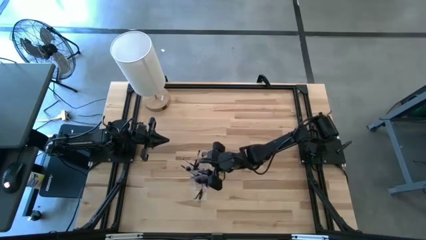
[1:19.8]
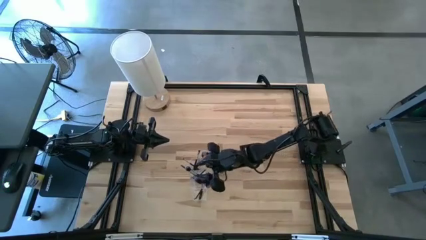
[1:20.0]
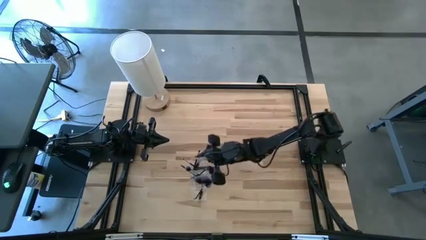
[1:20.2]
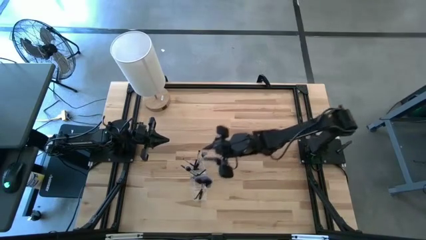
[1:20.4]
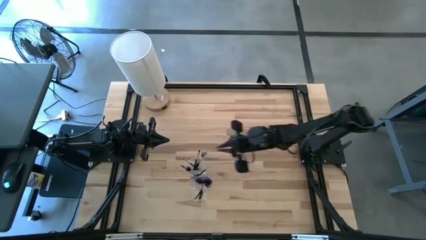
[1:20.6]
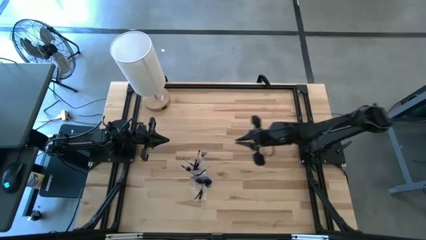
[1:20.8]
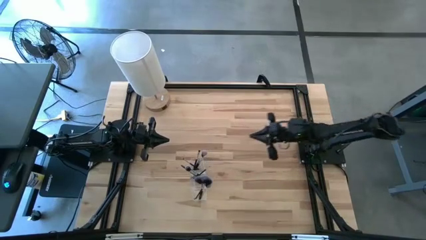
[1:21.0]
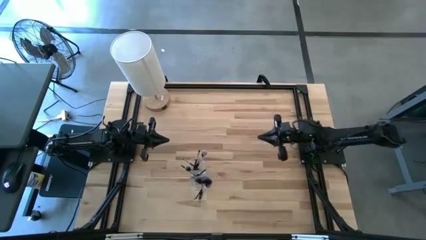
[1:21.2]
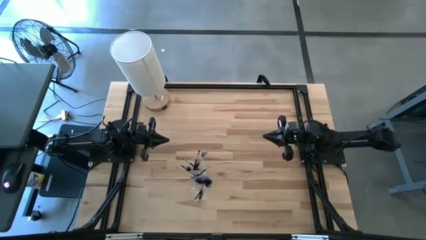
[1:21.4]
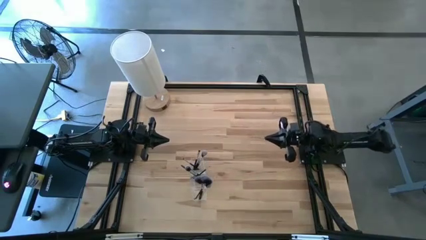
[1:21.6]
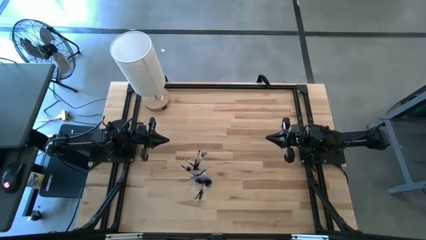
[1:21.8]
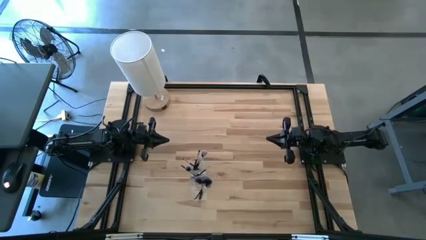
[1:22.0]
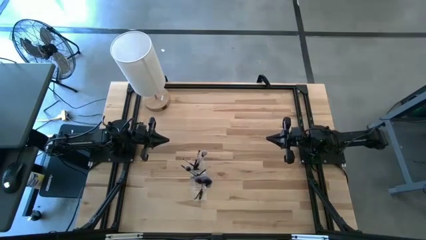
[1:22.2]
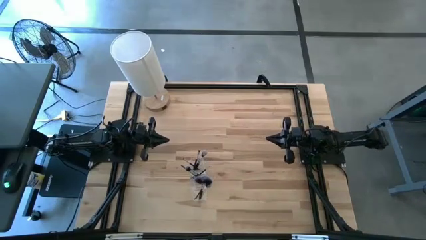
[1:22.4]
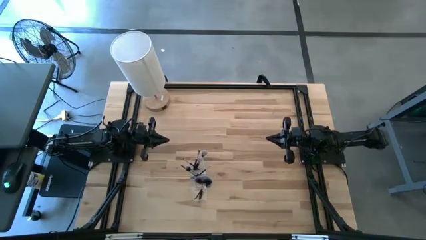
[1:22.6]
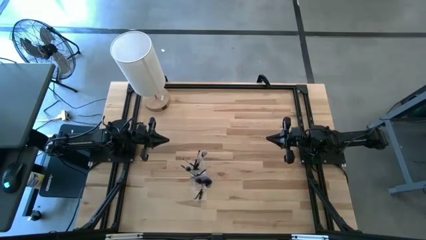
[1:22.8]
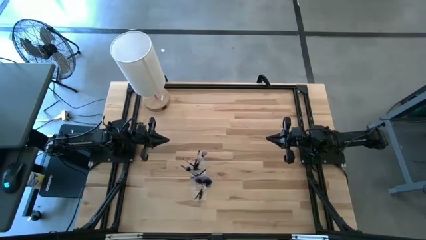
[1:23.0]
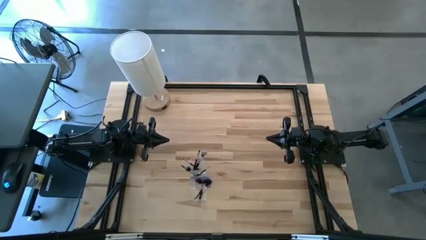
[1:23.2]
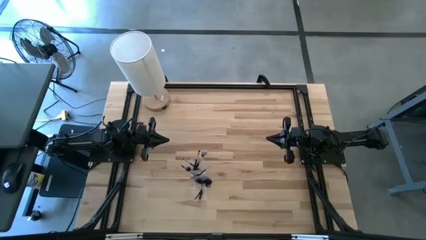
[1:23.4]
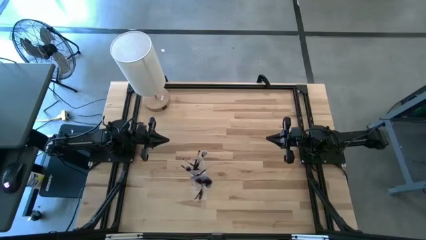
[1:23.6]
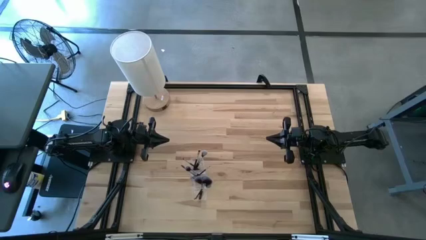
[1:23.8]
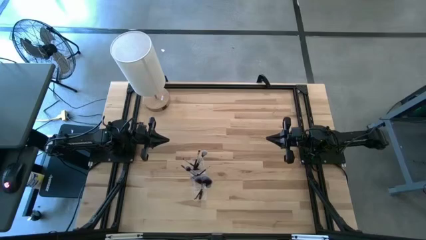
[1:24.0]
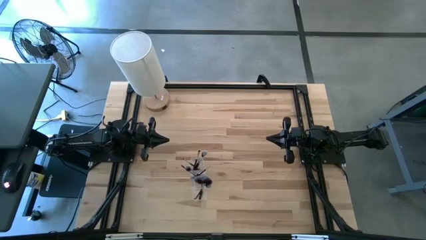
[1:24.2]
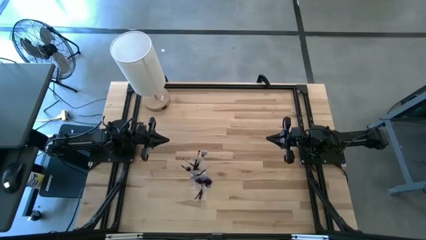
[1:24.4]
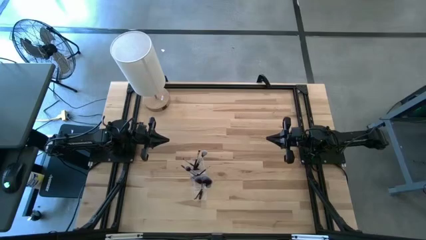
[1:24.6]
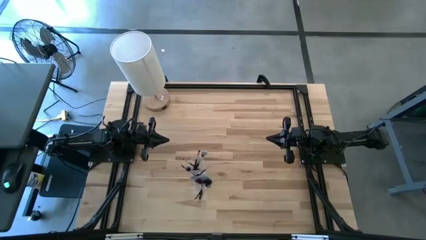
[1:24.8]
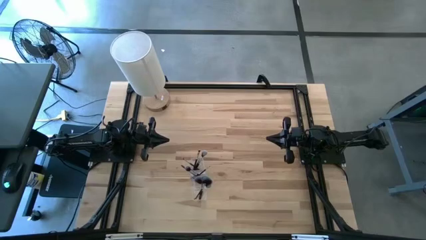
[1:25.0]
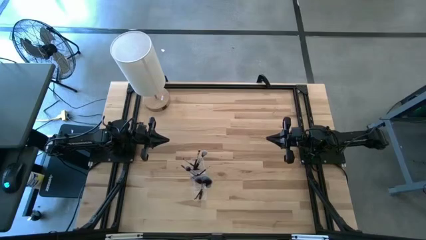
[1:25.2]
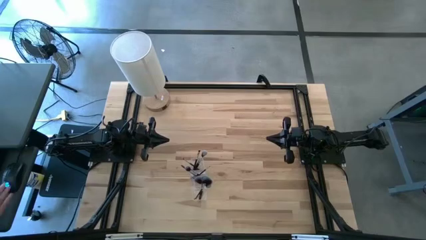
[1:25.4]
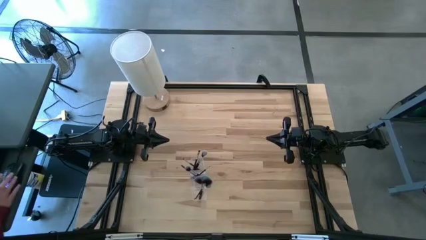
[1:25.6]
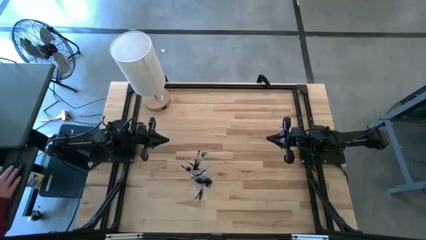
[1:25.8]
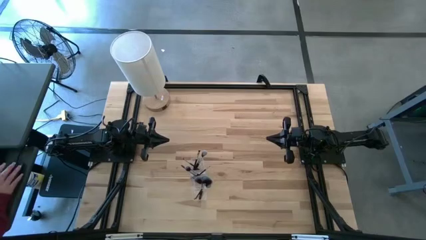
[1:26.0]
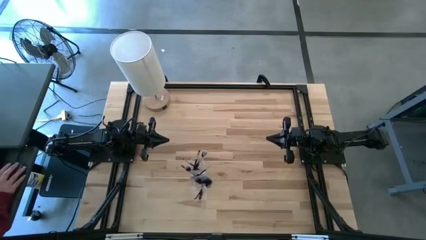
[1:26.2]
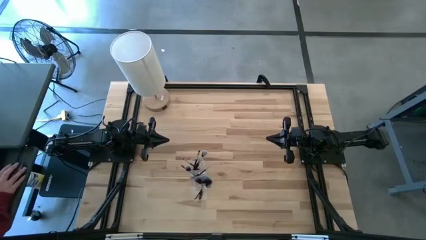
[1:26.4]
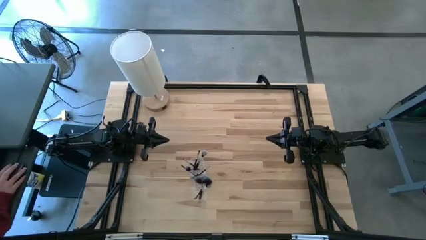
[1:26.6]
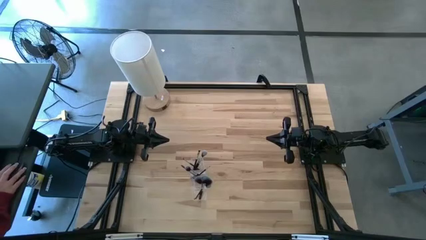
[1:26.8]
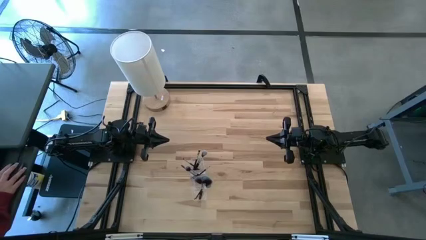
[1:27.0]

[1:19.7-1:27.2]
Task: Put items in baskets/containers
Return to Home Position

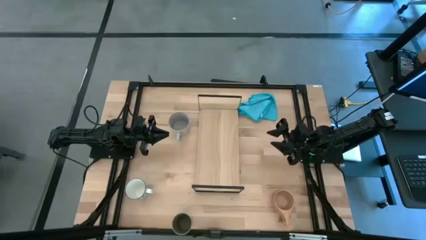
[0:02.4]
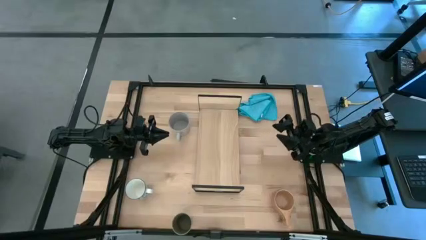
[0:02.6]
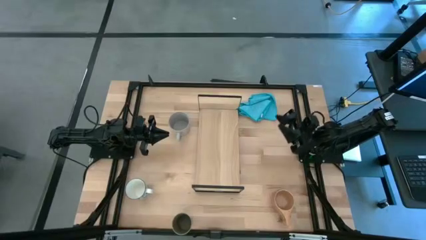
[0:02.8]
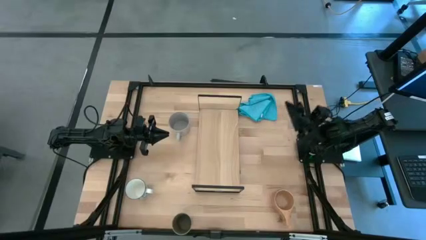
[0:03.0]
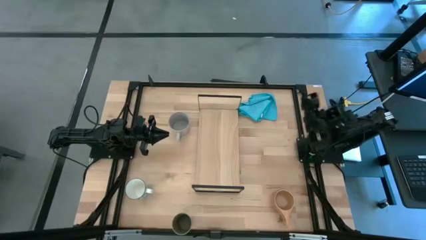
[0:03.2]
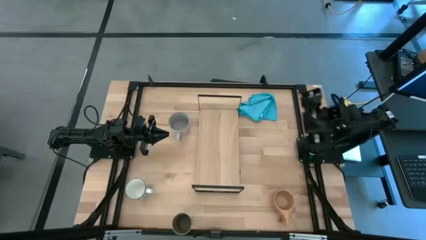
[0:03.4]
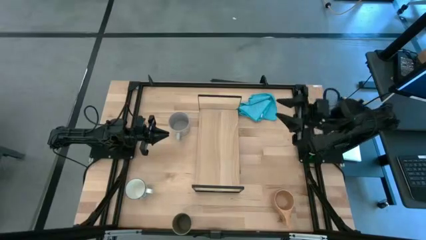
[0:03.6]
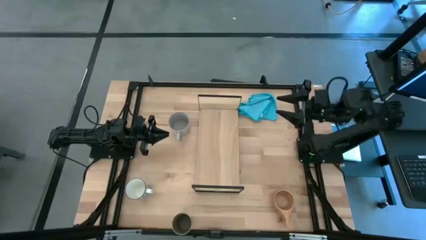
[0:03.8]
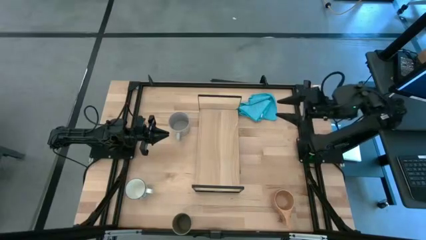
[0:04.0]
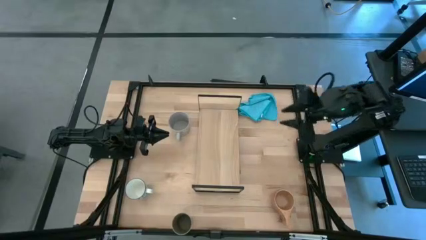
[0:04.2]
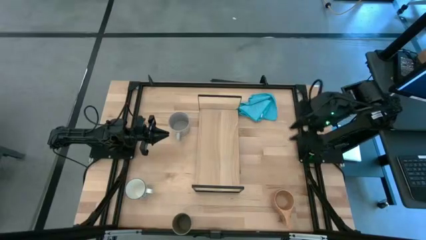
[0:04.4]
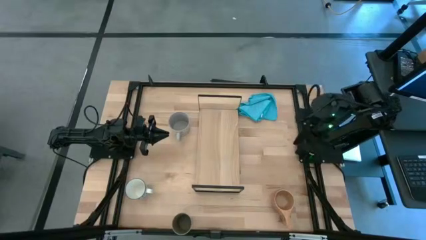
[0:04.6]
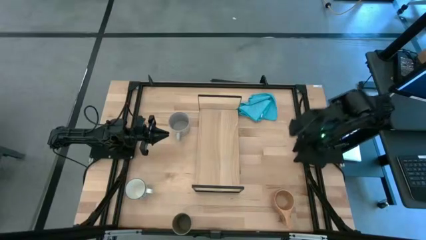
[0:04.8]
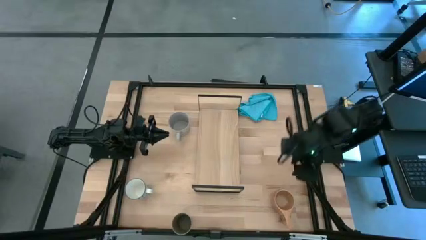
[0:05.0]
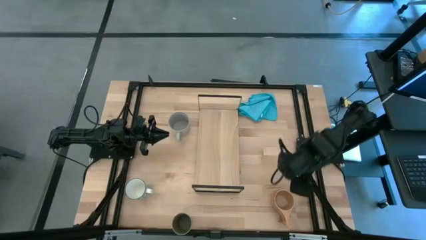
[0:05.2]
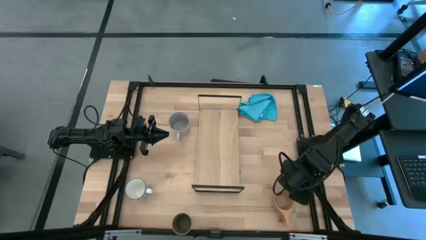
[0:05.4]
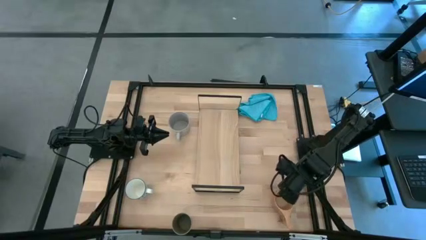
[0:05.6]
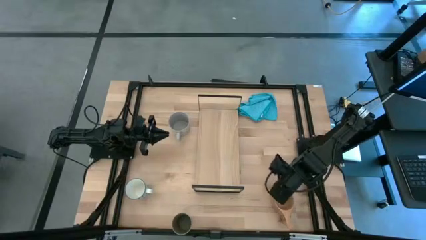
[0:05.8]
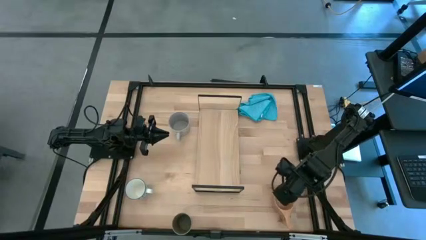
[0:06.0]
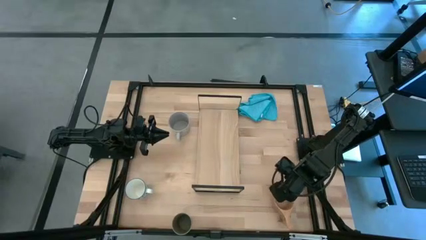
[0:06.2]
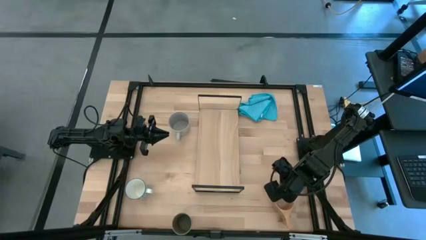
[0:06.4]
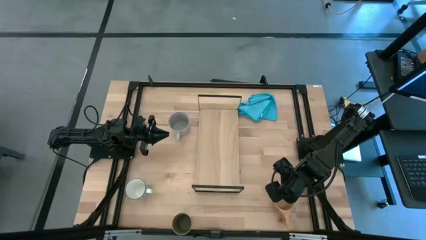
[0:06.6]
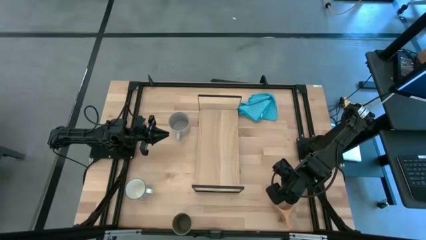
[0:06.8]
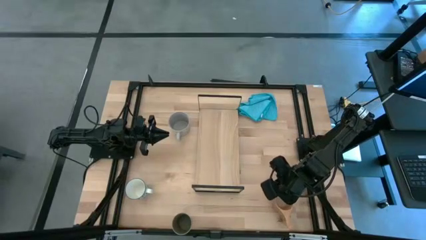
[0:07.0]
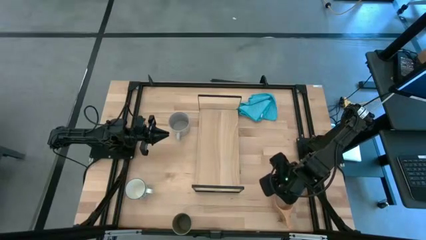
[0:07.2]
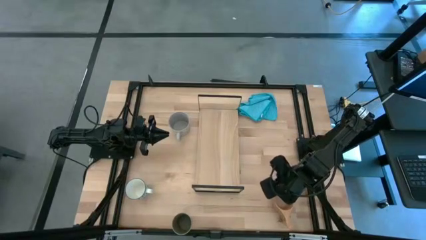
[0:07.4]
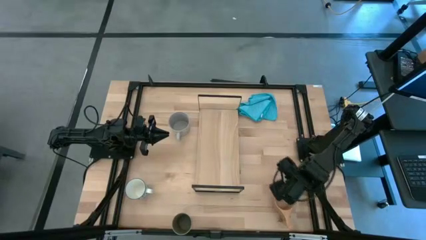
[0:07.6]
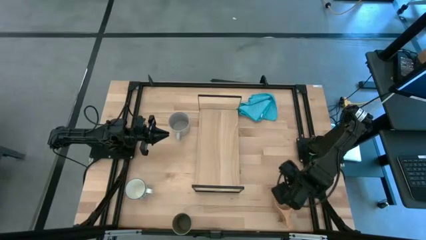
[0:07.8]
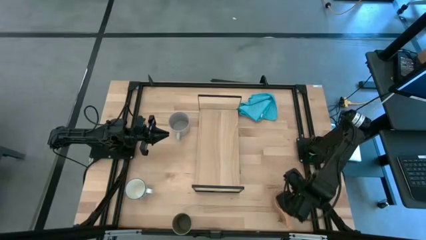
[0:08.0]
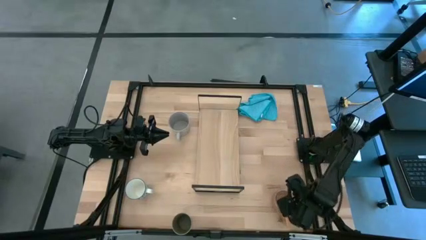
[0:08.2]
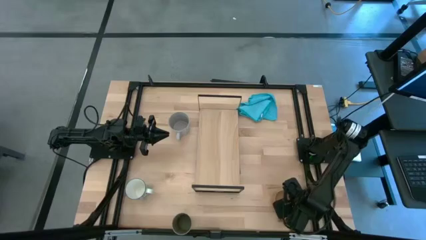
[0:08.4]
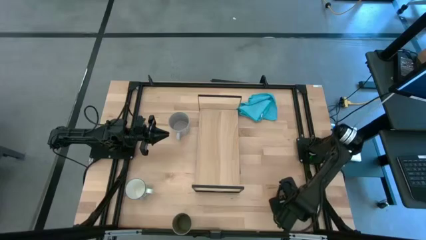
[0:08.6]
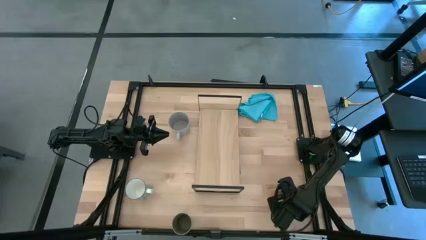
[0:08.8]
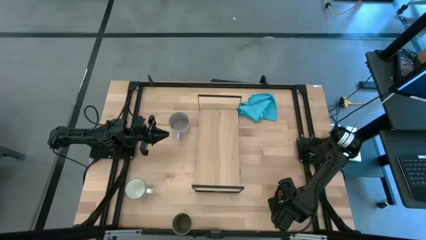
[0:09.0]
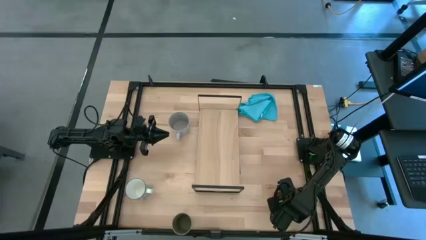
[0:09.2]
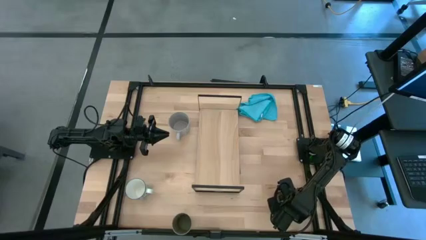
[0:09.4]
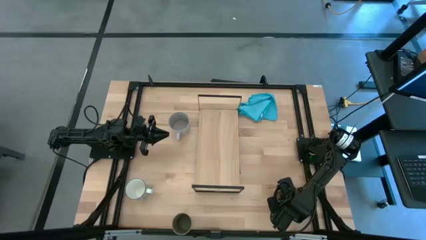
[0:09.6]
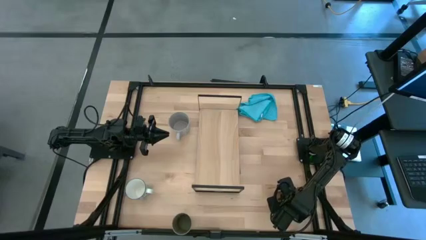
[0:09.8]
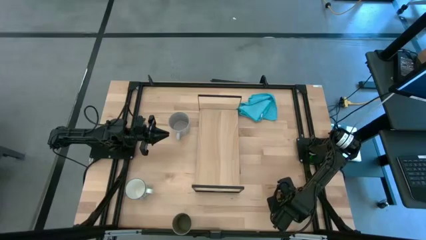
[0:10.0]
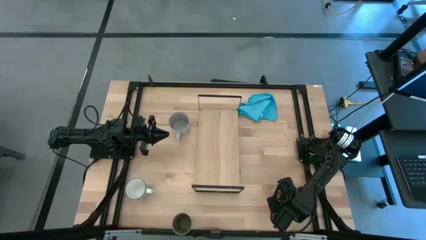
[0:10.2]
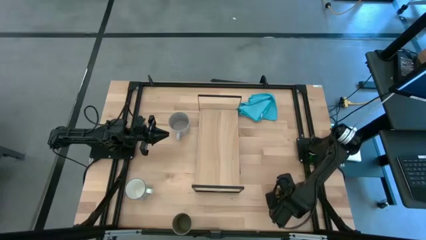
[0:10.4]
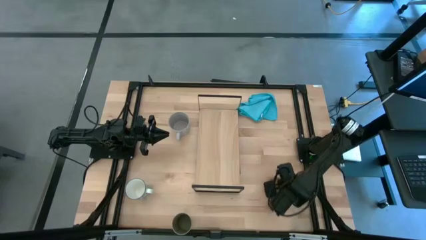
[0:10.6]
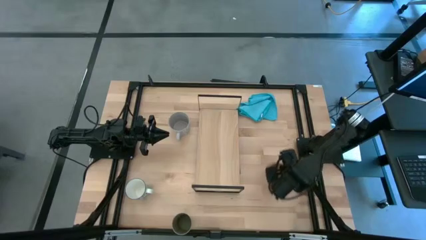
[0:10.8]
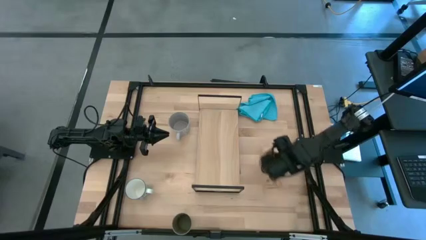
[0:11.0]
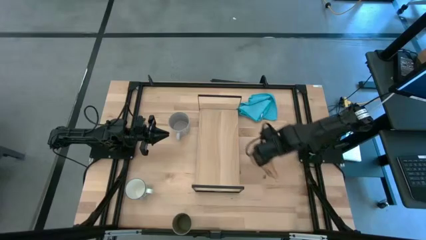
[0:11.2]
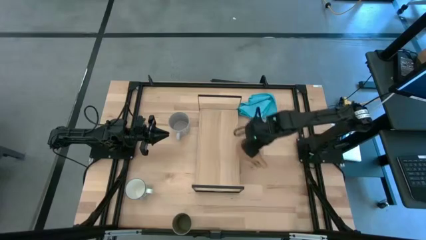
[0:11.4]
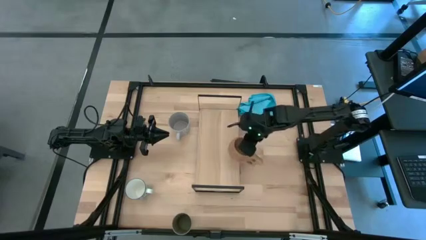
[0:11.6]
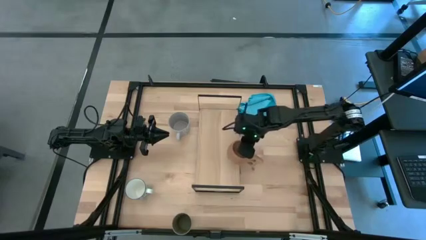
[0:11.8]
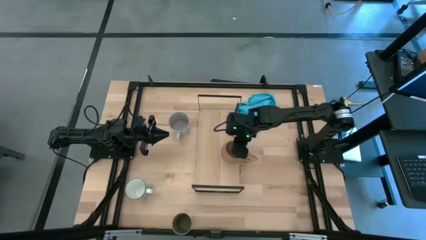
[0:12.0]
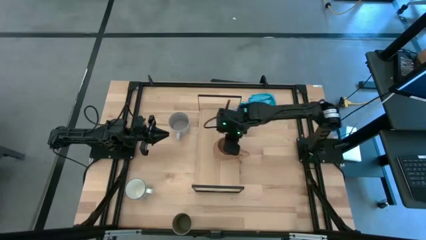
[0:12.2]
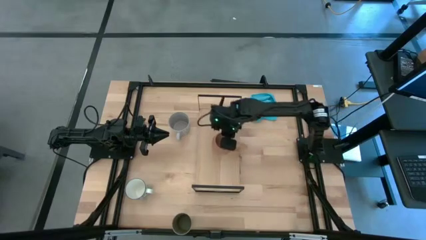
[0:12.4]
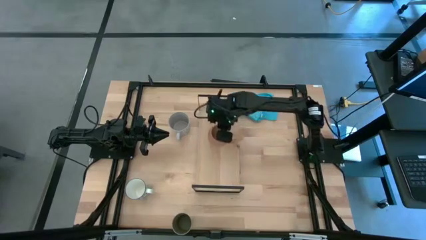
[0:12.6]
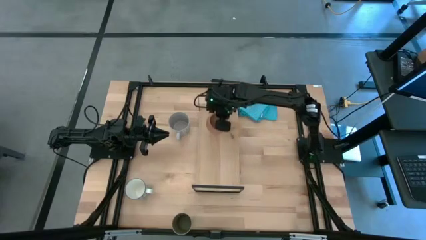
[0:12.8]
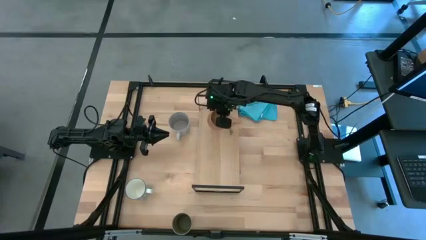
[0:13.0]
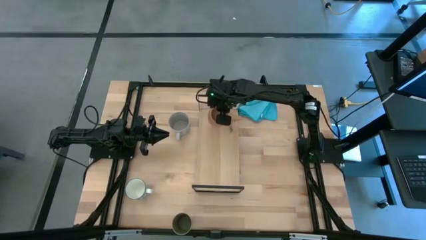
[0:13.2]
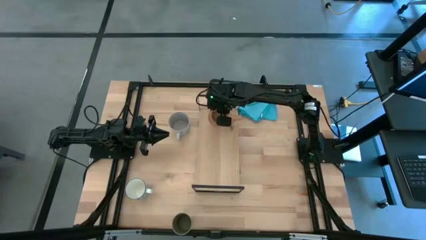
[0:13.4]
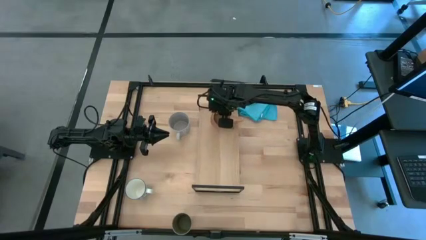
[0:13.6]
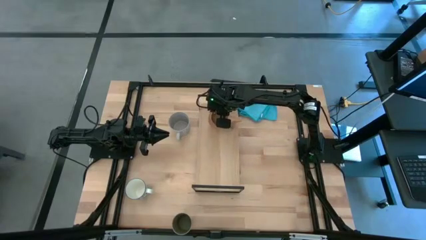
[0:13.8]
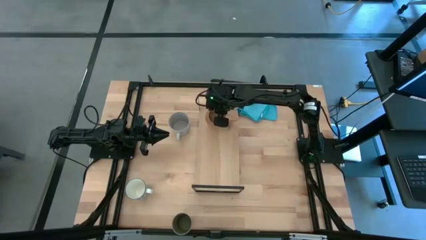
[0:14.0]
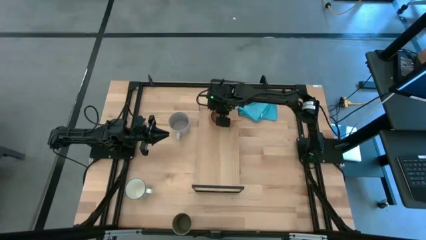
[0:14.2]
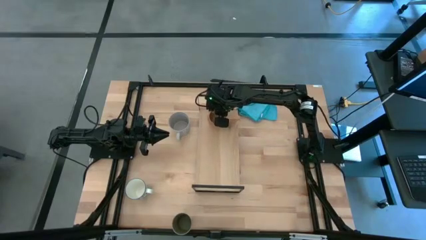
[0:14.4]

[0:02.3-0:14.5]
Task: Stack small to large cups/mugs on shelf
Put the wooden mug on the shelf
